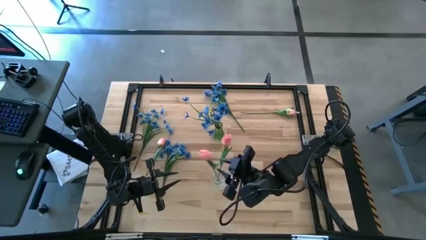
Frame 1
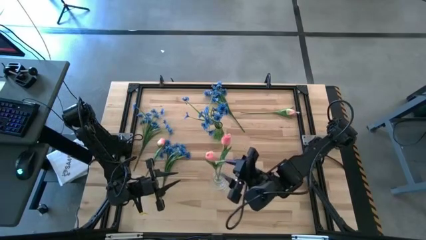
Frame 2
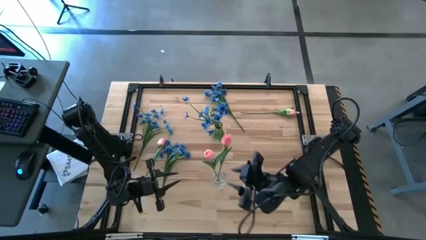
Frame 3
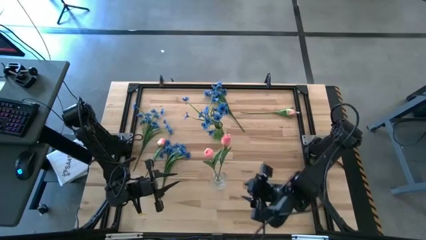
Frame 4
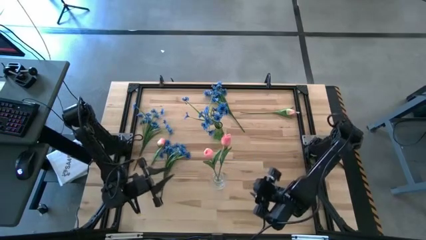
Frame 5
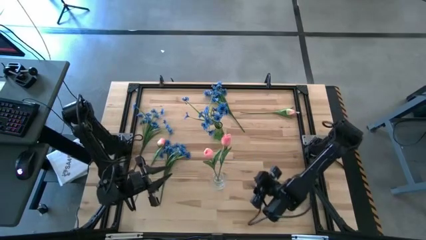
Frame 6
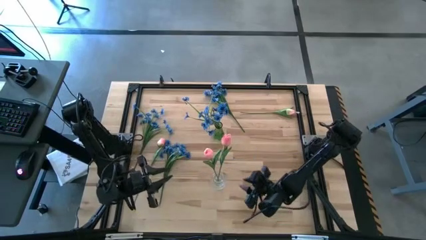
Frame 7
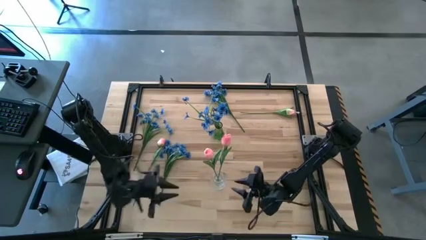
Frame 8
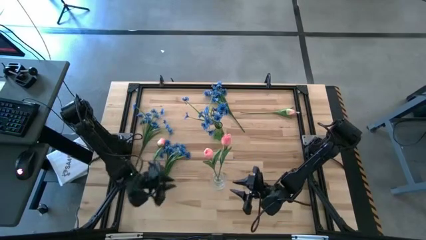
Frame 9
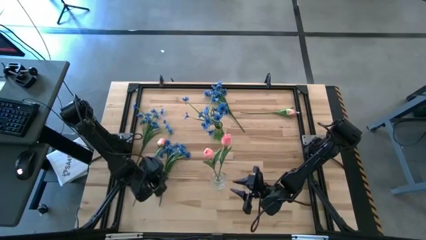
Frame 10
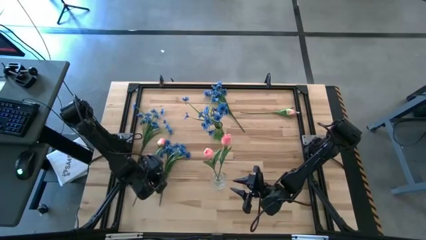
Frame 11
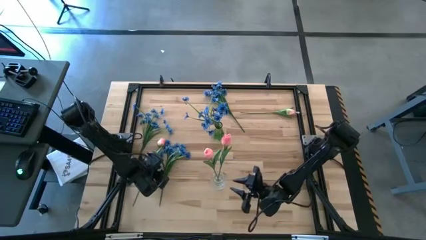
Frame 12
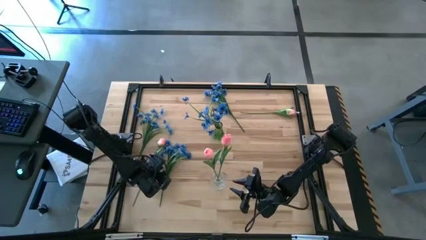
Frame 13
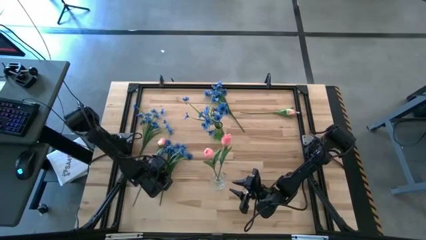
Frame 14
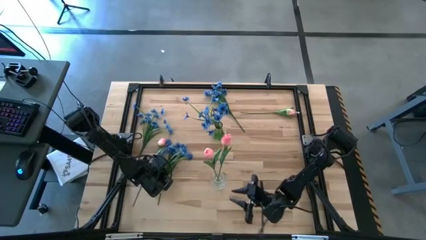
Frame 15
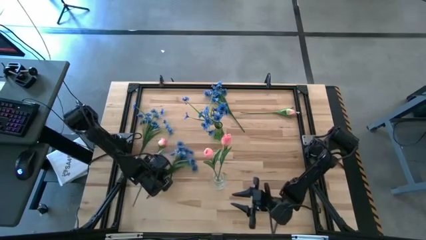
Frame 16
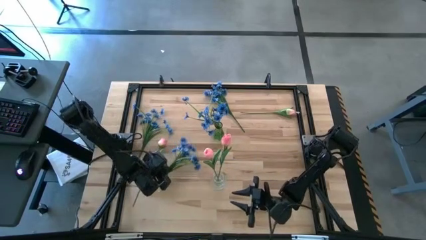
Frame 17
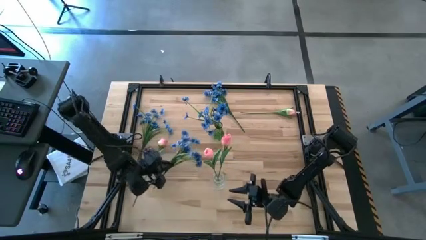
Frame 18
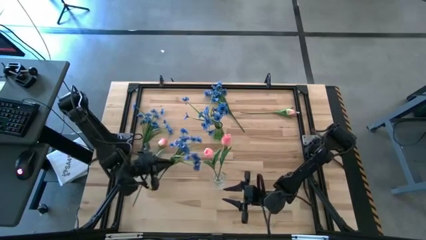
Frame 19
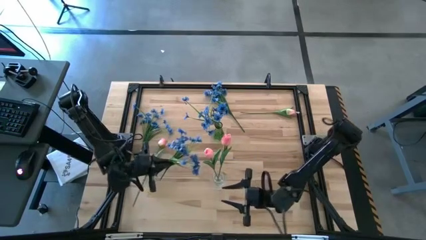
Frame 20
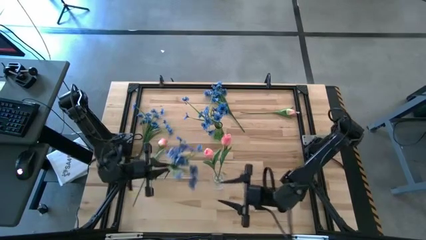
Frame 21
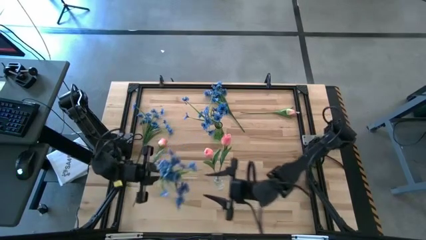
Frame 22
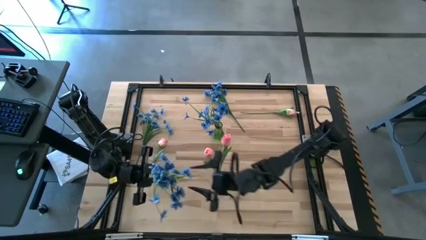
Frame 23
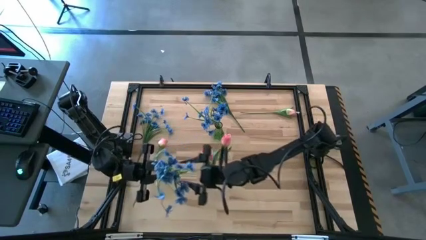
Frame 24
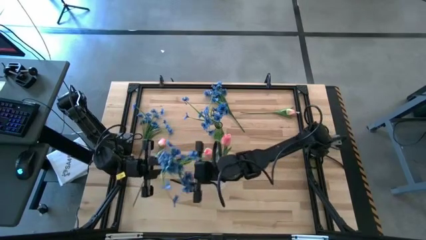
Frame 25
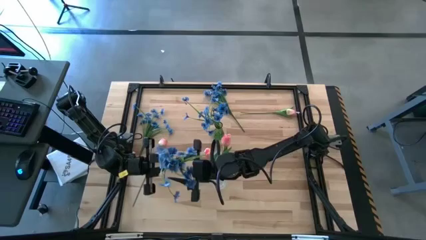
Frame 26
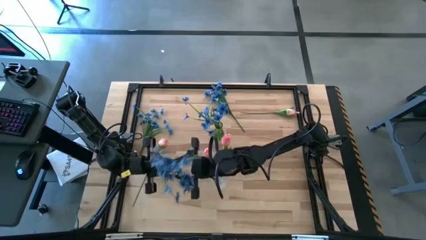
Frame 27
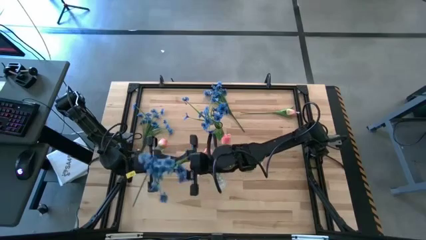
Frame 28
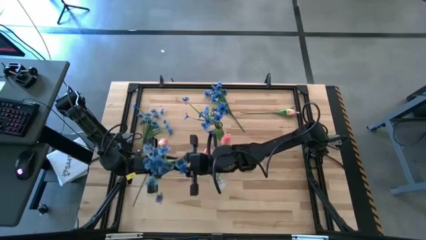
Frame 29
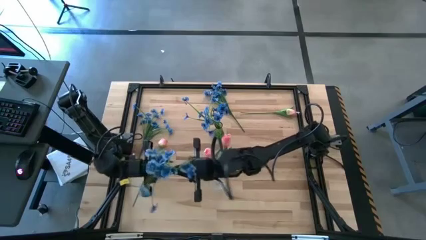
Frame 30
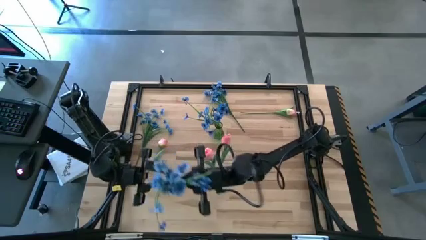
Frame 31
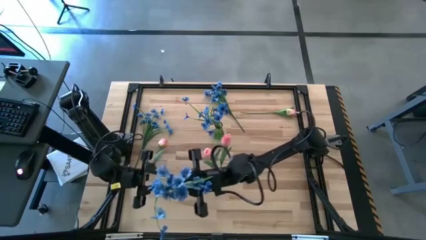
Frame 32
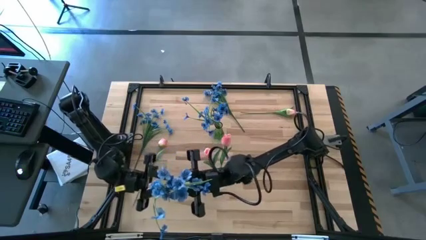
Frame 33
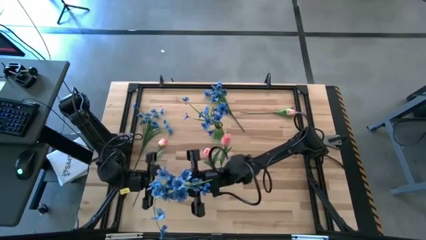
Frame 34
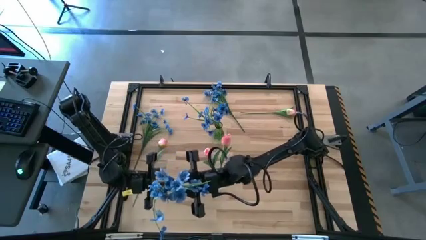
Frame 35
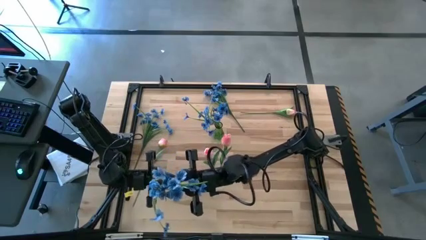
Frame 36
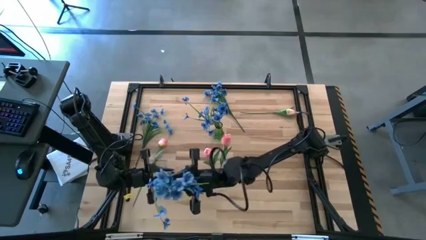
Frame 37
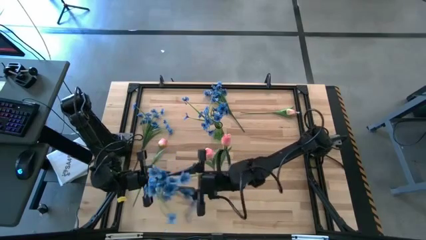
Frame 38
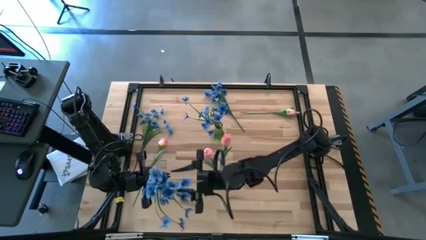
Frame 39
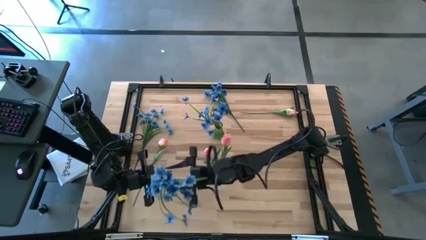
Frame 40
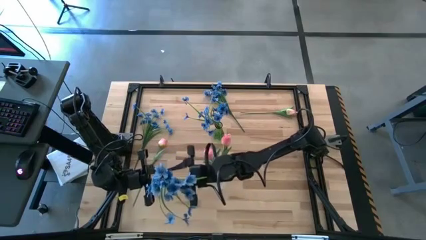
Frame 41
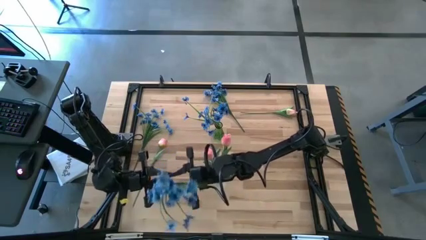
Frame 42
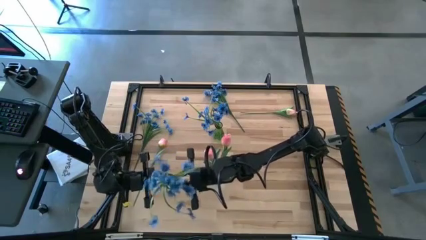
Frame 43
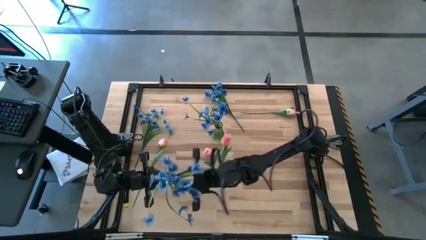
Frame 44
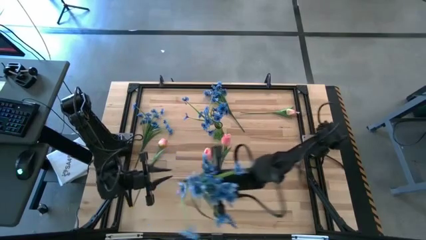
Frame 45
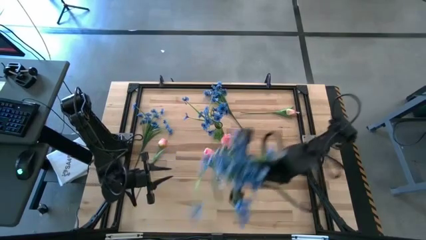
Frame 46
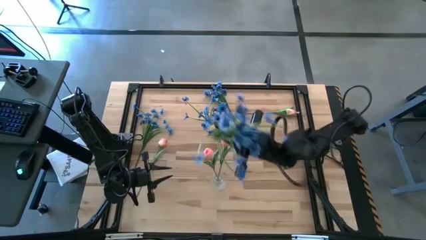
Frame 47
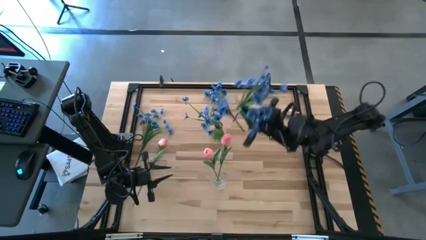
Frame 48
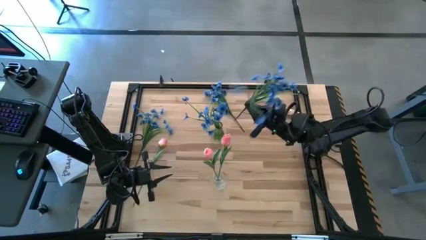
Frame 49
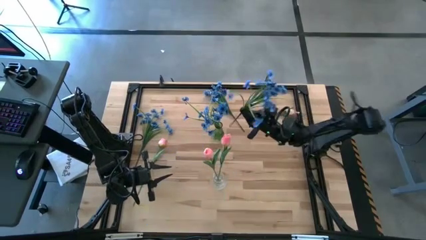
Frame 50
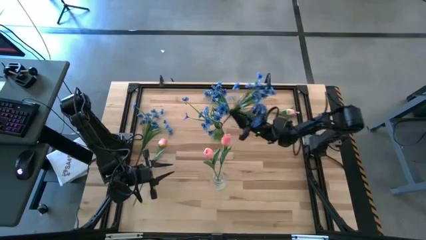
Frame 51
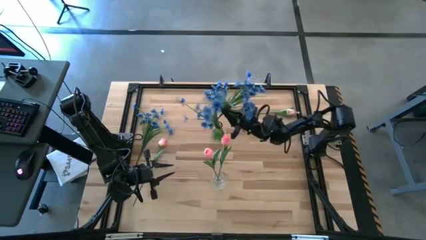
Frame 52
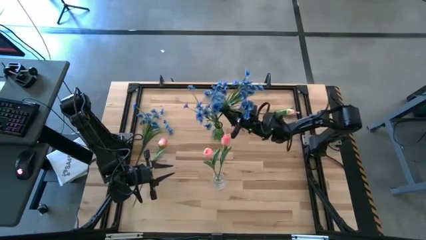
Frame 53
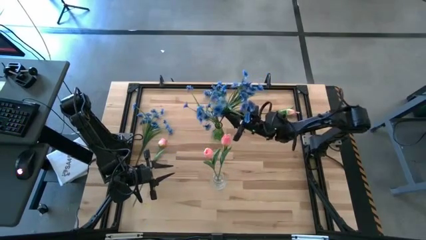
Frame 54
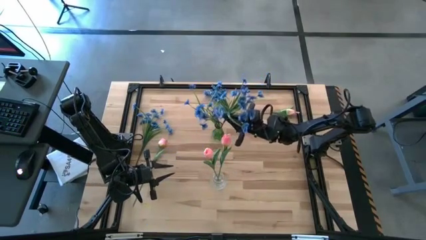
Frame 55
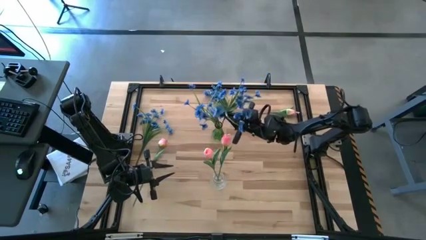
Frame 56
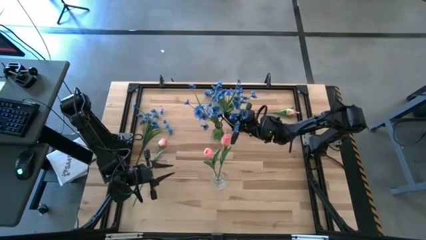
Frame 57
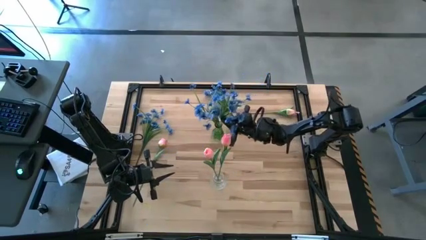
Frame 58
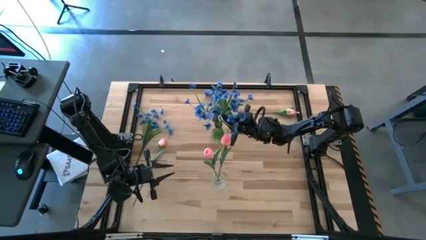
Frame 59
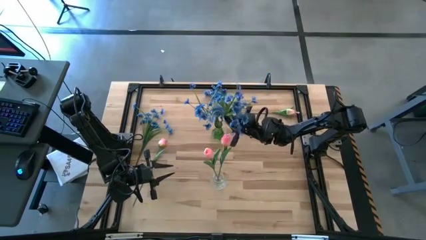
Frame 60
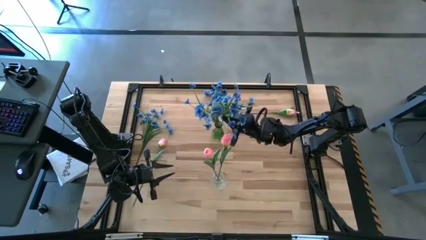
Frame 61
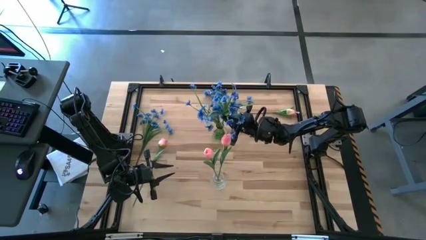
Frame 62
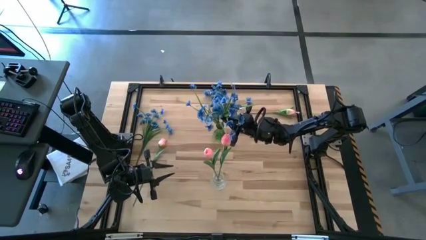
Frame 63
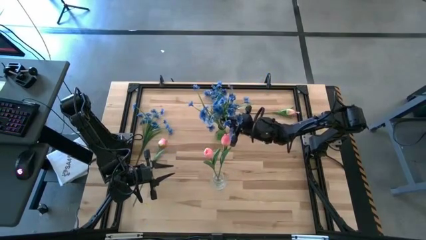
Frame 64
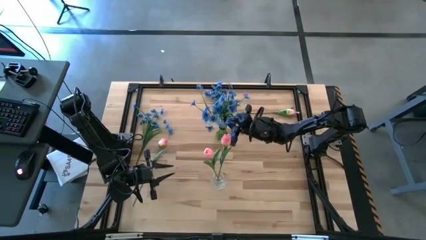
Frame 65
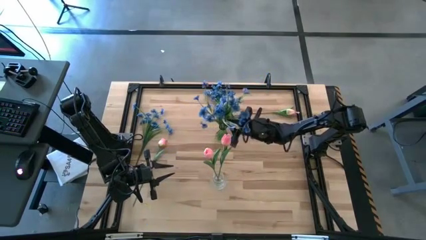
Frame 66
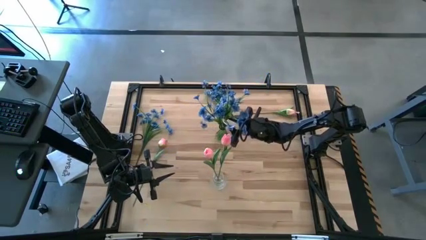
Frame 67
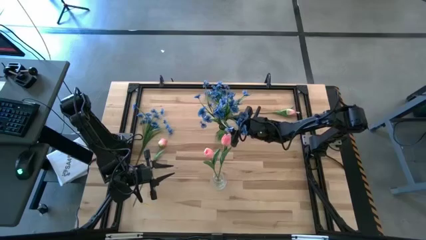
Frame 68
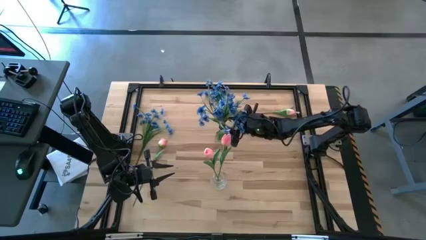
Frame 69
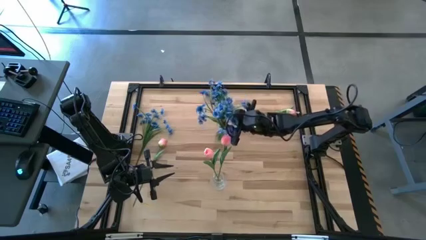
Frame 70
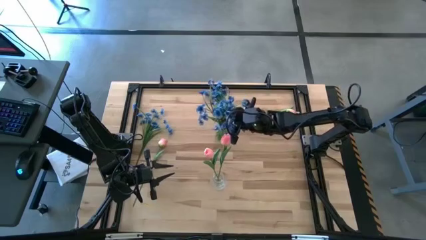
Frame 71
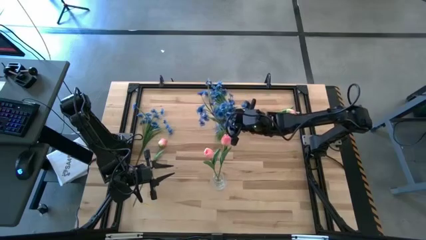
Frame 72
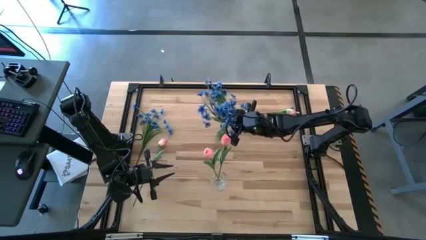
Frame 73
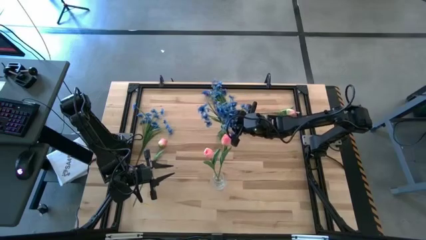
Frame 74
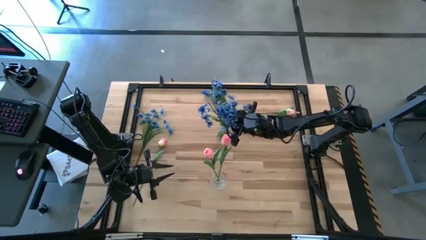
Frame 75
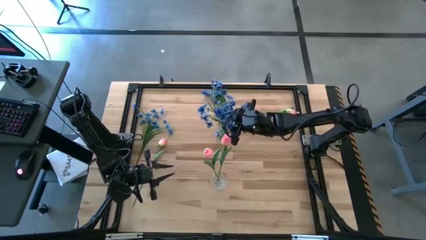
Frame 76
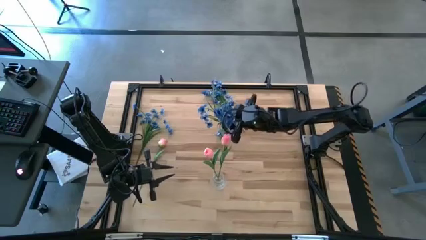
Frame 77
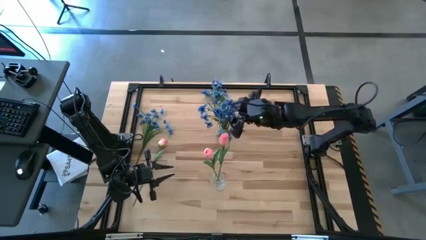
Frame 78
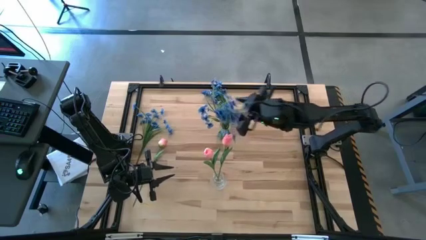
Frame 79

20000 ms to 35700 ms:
Task: Sort flowers into vase by color
Put the bottom blue flowers into the green vase
